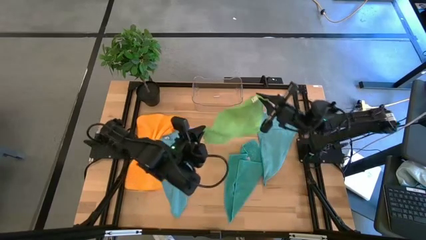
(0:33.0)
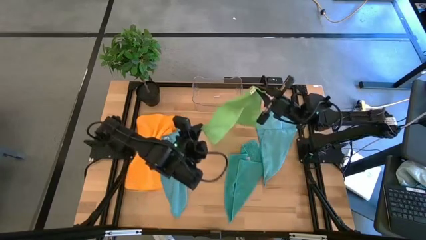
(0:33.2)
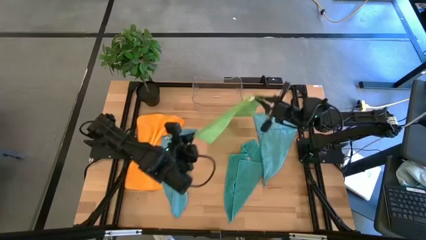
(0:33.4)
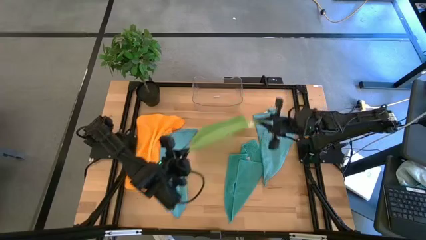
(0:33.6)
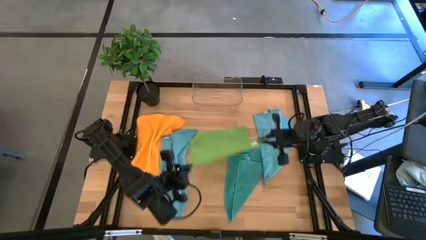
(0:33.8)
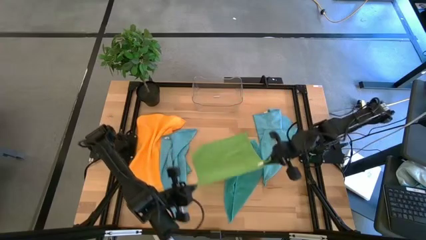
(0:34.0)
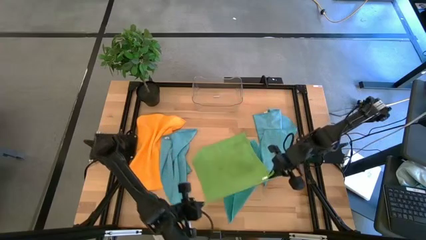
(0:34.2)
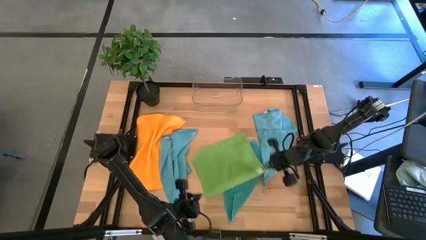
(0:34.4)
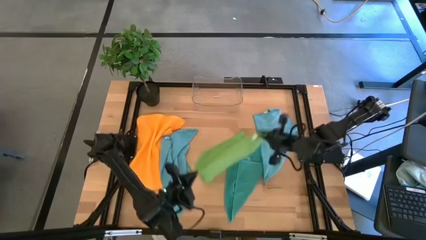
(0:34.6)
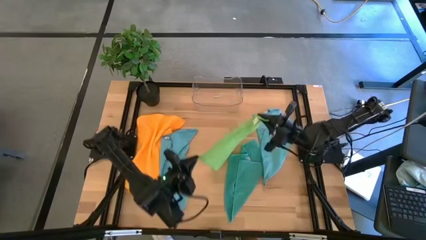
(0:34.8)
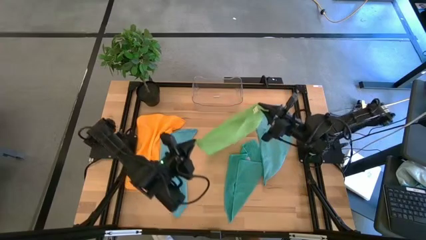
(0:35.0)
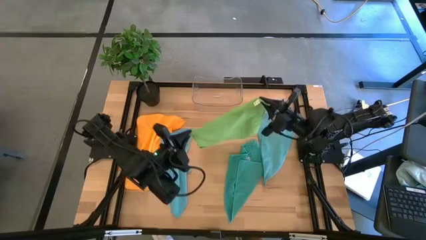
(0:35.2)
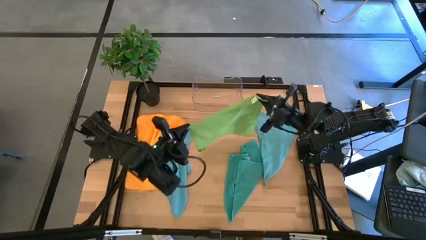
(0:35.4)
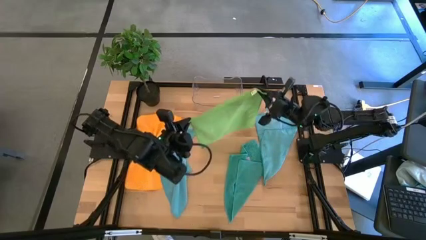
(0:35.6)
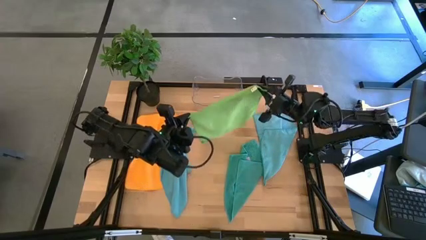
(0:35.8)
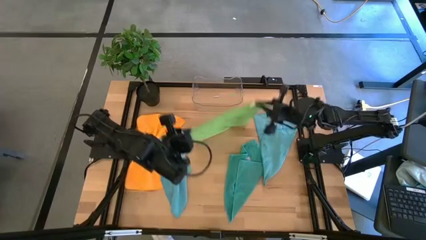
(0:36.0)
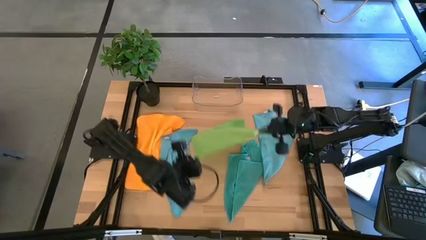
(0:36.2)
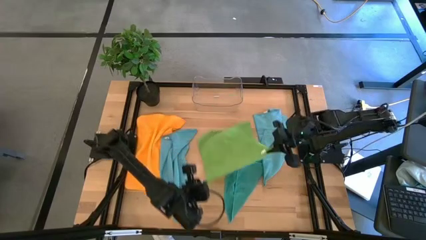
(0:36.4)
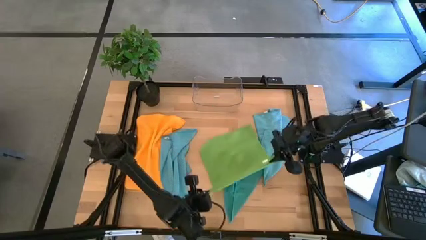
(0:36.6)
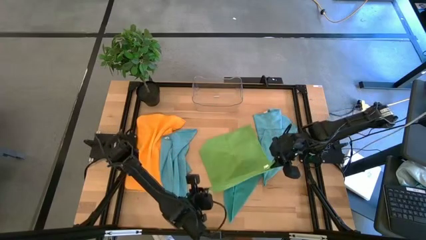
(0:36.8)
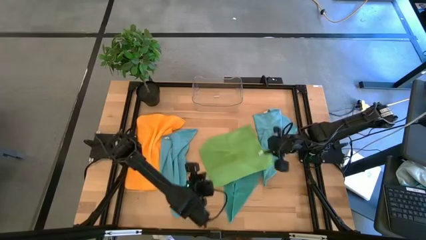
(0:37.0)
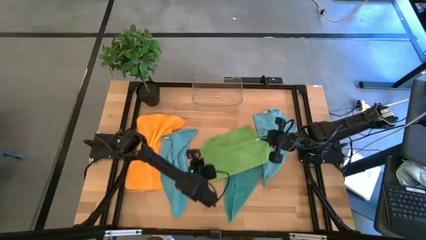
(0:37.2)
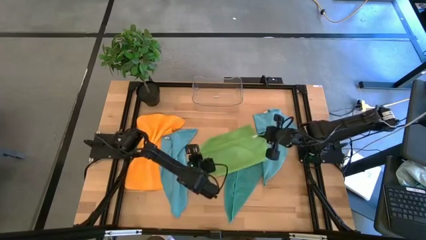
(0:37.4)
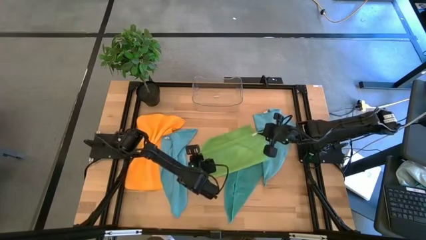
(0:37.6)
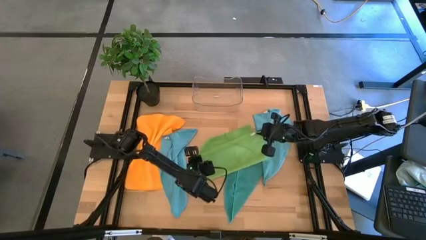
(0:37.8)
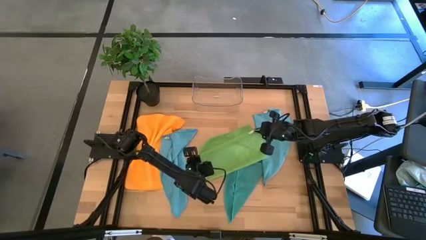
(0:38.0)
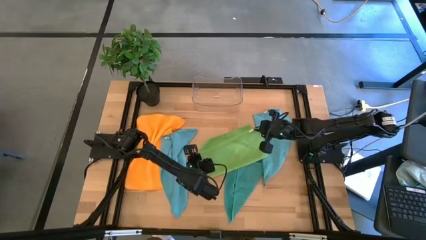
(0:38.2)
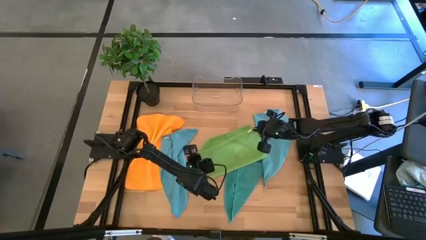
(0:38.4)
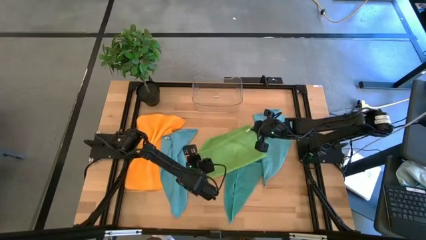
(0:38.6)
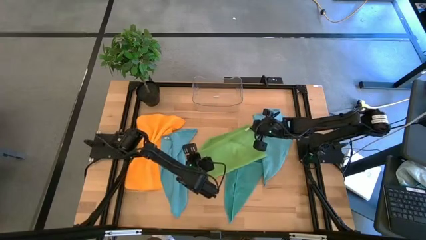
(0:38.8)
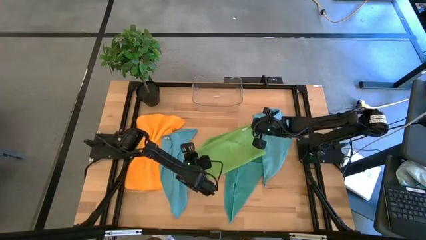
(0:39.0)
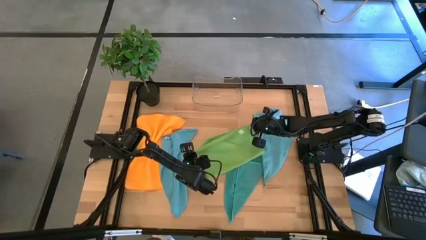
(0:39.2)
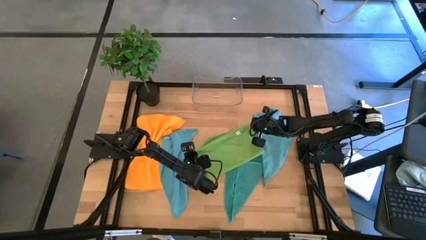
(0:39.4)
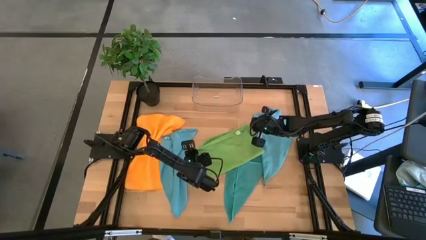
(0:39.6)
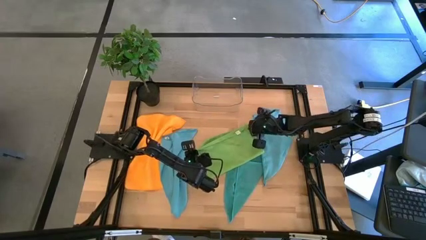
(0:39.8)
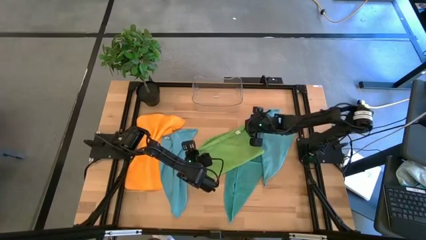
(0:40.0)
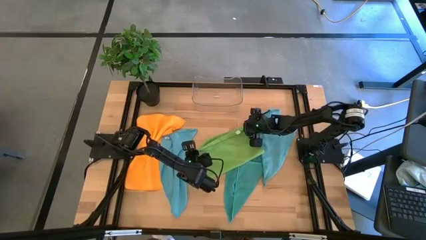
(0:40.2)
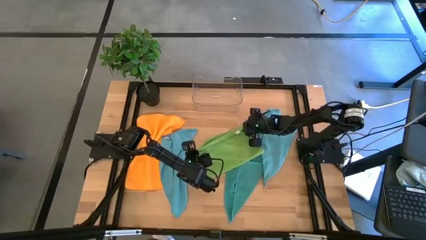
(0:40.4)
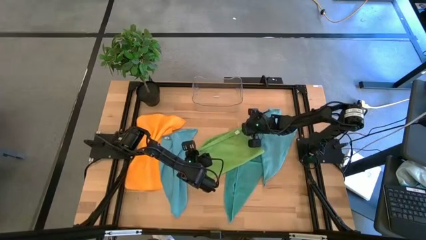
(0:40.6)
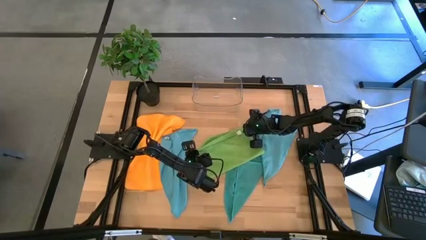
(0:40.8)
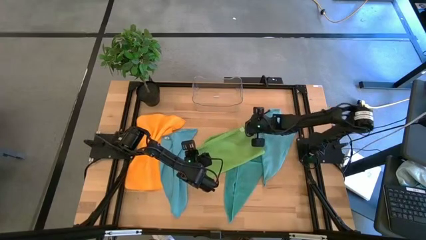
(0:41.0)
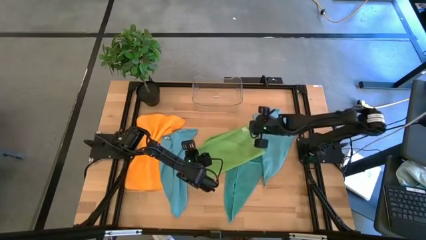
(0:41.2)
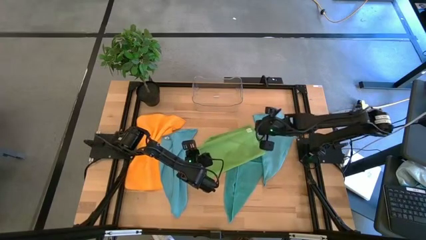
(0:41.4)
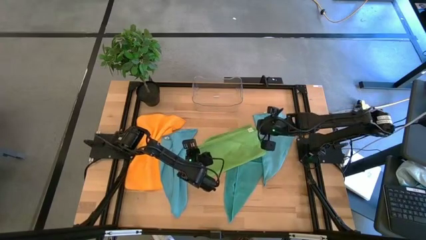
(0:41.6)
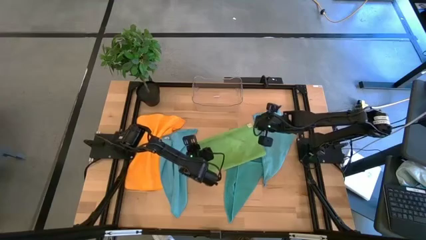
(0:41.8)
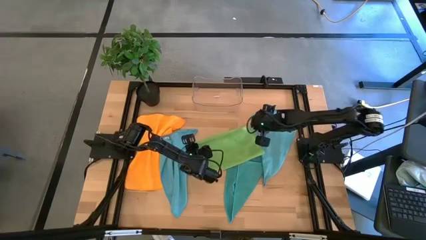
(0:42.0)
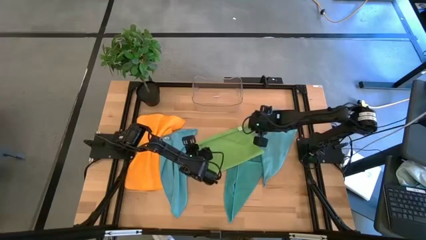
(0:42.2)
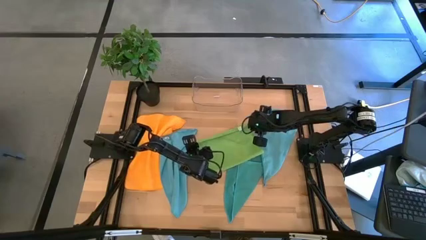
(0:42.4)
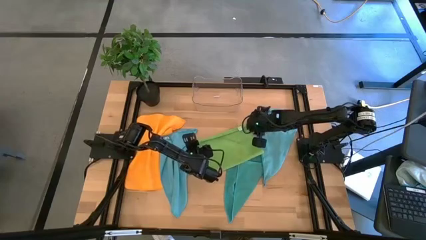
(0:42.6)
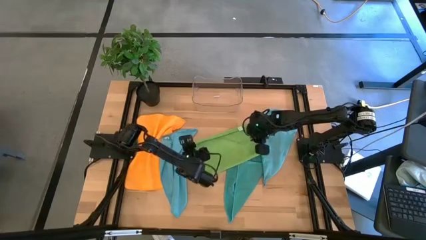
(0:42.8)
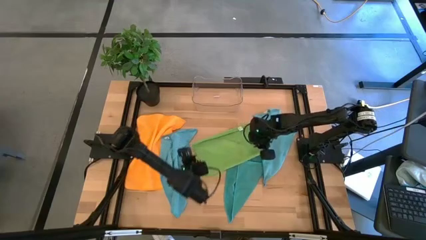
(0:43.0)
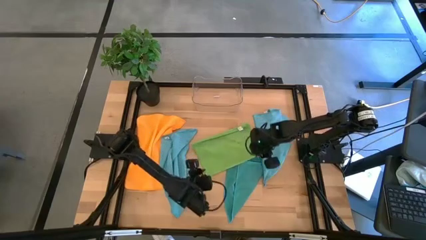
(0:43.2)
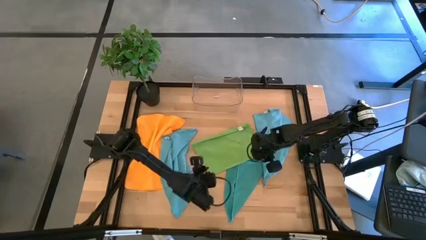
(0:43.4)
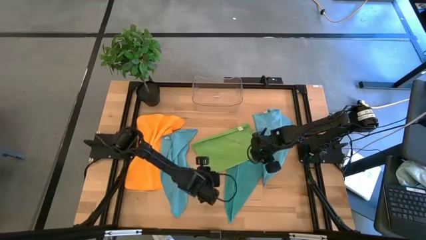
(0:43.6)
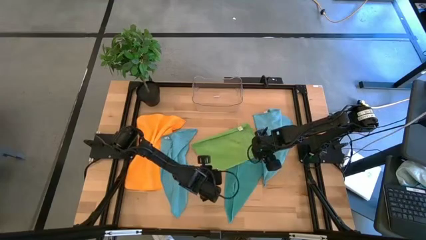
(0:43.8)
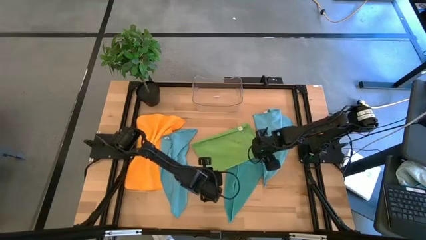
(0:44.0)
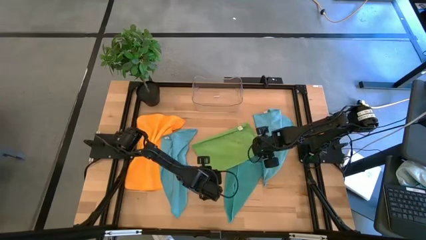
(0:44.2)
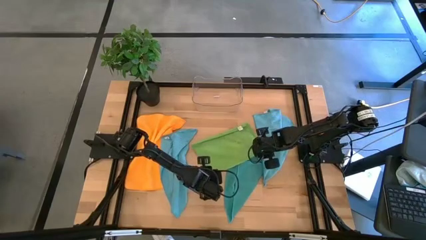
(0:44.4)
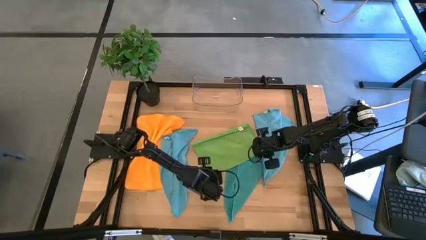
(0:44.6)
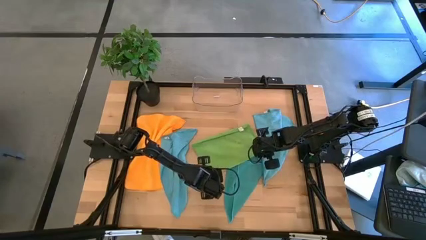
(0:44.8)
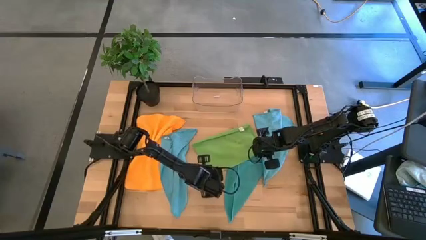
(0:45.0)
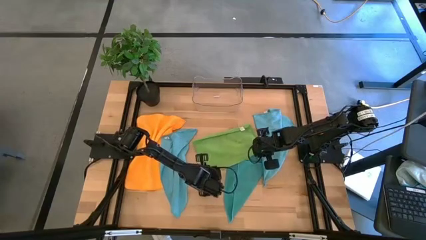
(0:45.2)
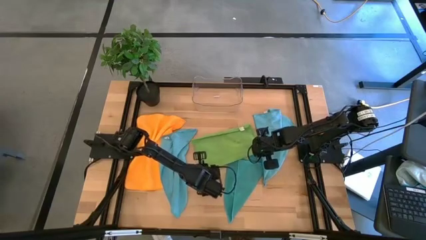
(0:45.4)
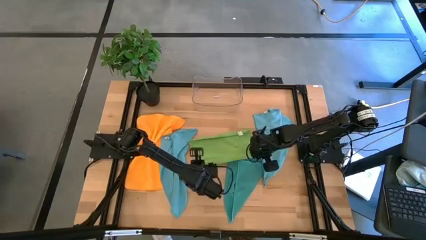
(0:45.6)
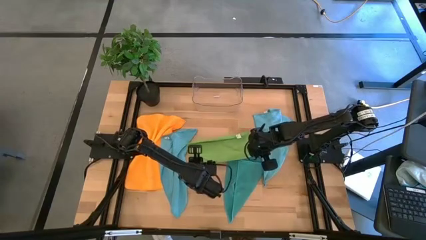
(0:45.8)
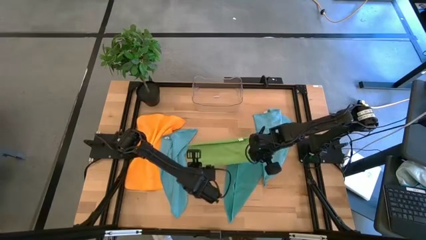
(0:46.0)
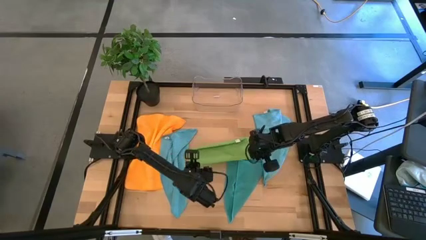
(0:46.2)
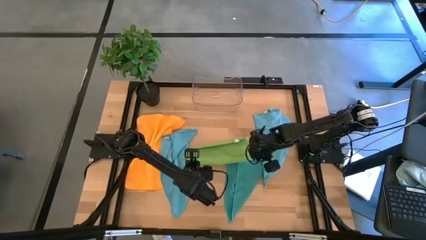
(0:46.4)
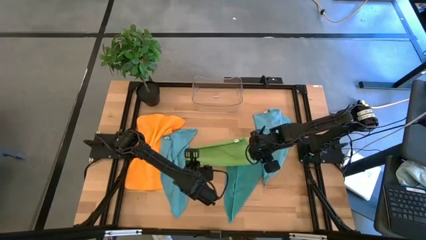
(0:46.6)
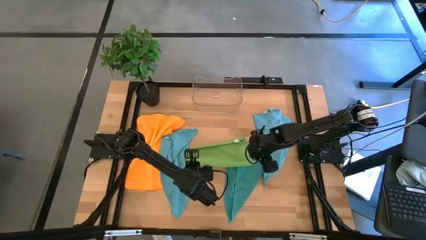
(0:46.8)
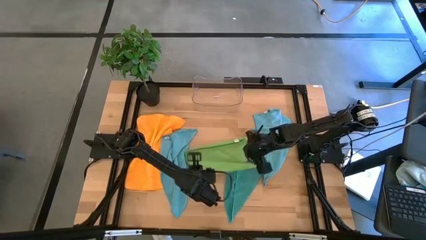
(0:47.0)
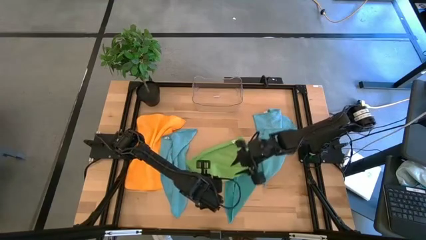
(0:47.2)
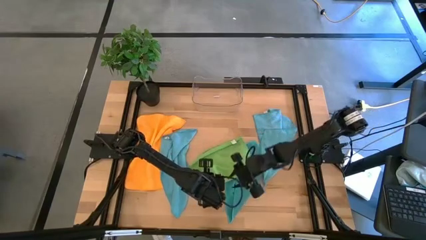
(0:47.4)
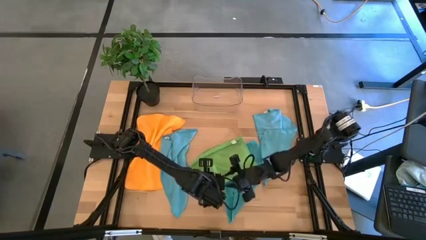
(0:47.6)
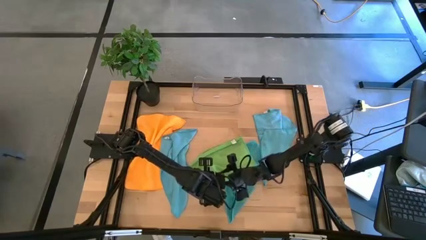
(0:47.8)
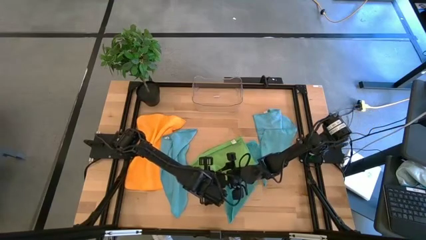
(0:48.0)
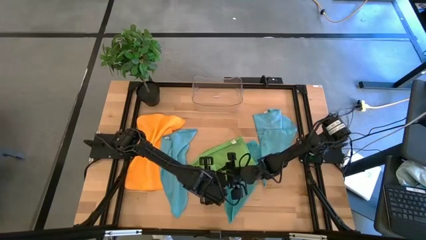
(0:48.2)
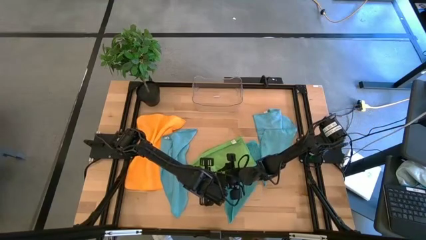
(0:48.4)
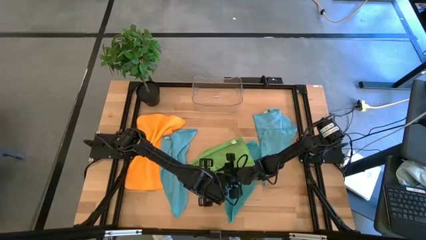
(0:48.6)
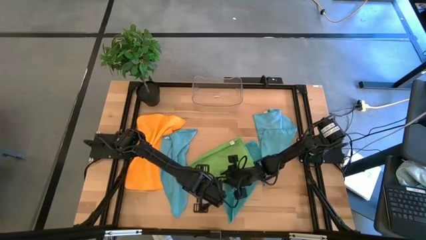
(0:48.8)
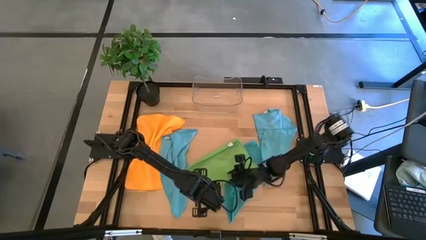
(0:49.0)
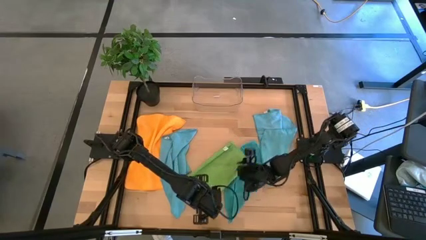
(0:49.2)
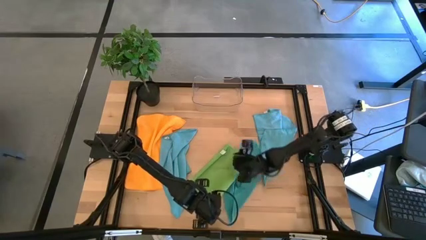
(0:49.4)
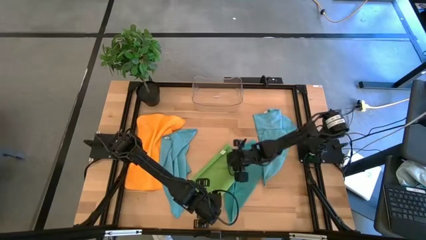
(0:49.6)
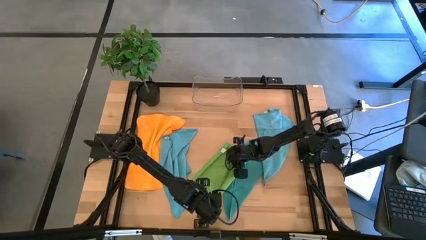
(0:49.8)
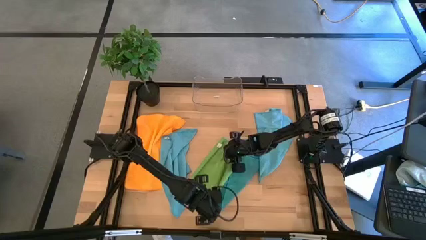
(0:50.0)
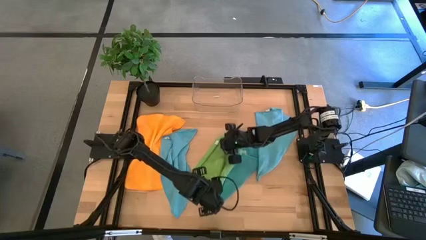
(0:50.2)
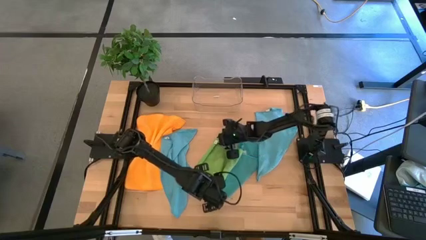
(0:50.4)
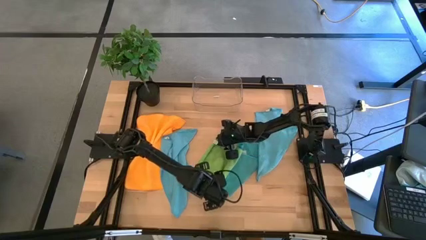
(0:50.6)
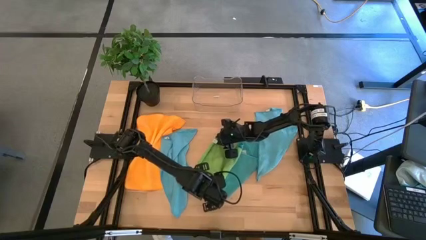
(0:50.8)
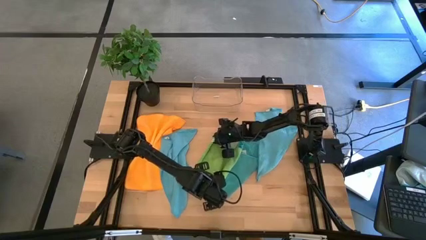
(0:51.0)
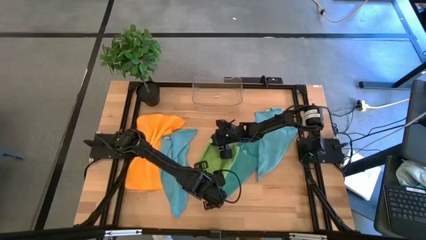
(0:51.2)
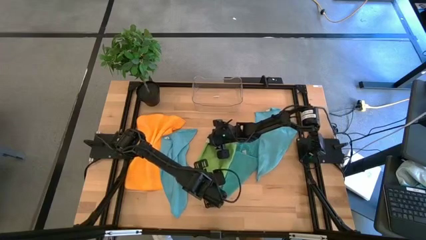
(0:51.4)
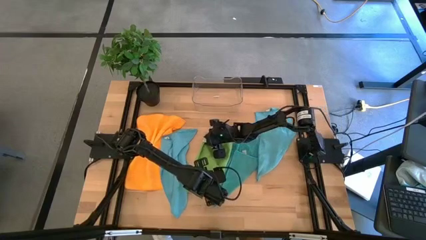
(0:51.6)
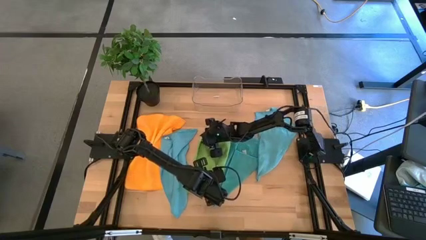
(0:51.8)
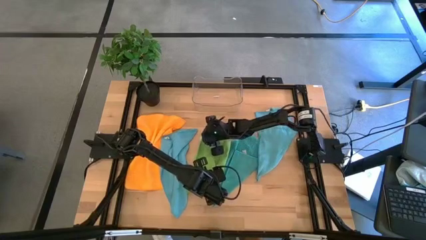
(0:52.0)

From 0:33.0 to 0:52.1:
Task: Fold microfiber towels
Fold the green microfiber towel
